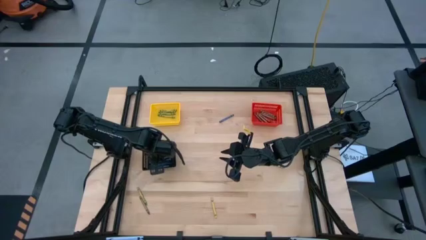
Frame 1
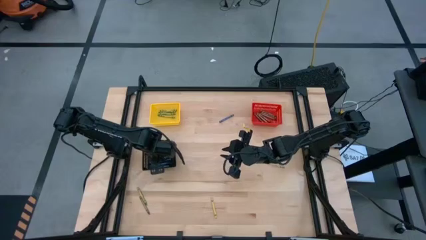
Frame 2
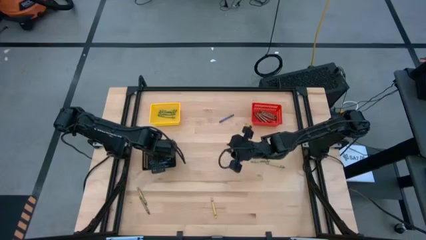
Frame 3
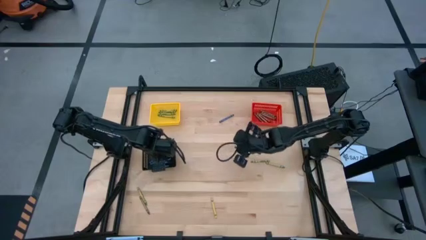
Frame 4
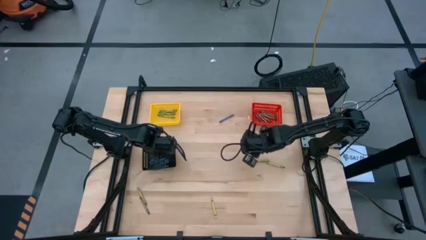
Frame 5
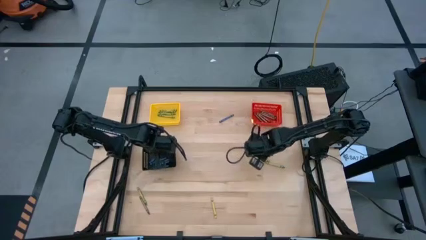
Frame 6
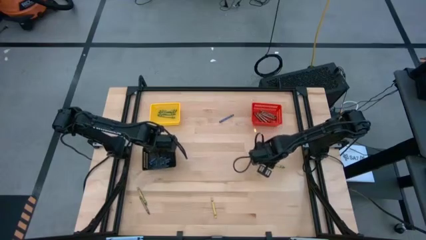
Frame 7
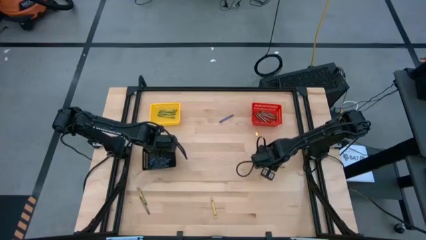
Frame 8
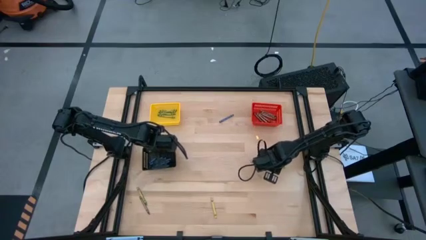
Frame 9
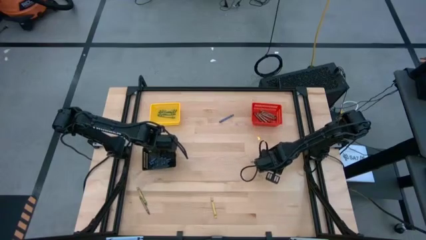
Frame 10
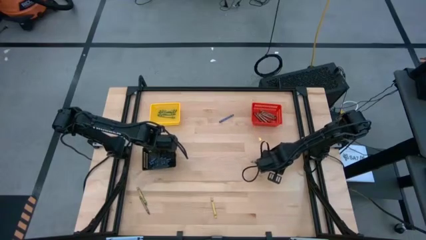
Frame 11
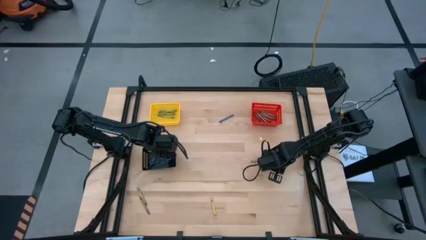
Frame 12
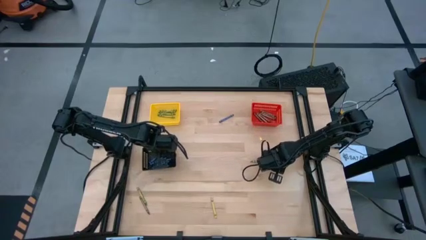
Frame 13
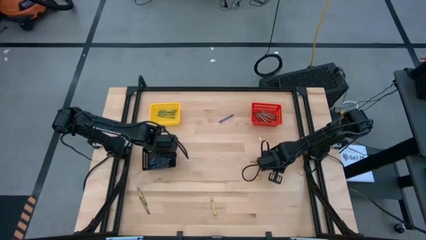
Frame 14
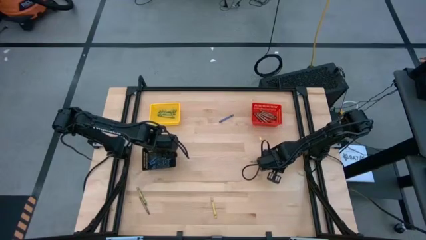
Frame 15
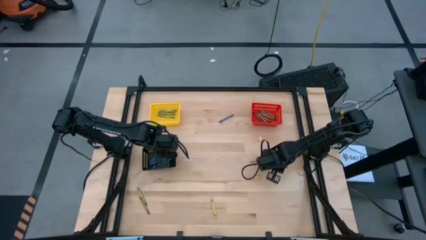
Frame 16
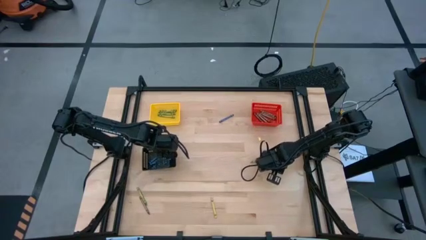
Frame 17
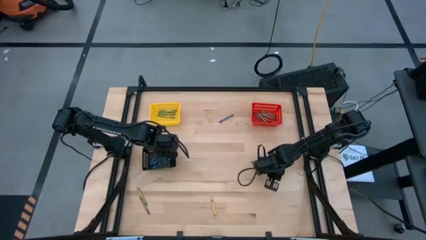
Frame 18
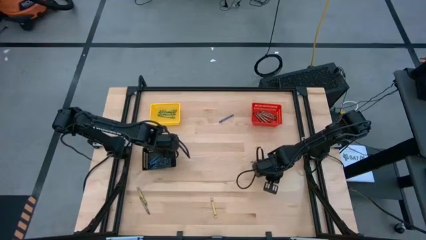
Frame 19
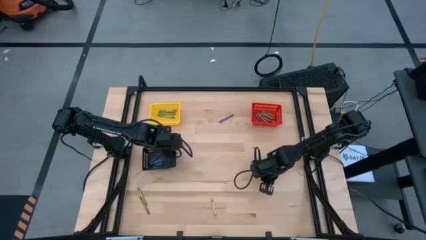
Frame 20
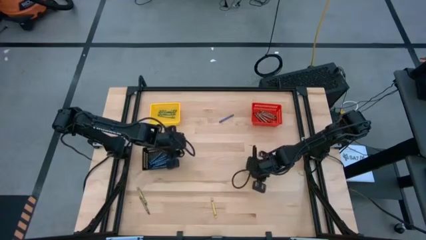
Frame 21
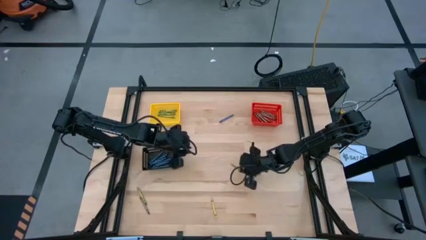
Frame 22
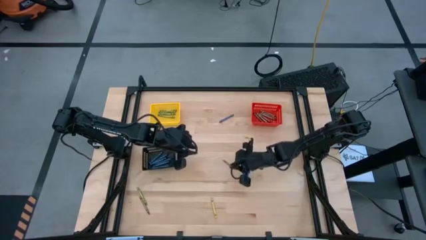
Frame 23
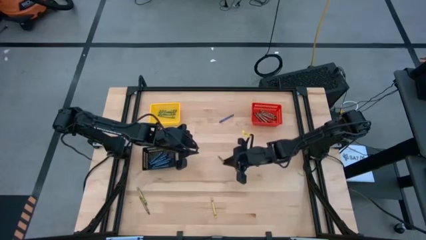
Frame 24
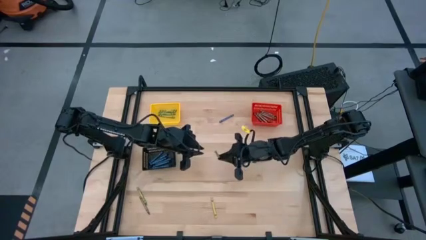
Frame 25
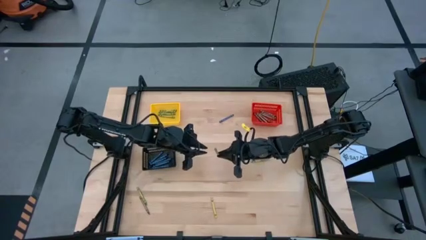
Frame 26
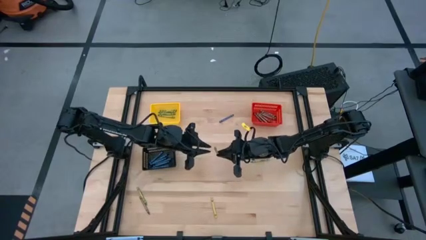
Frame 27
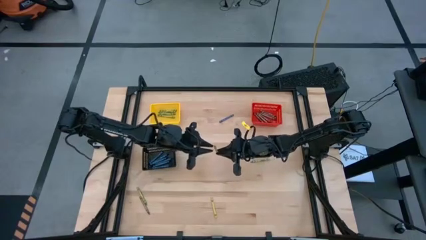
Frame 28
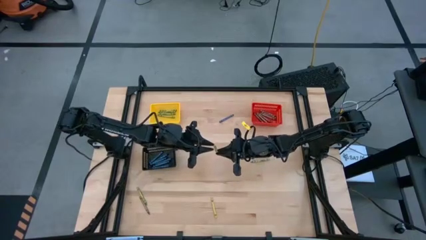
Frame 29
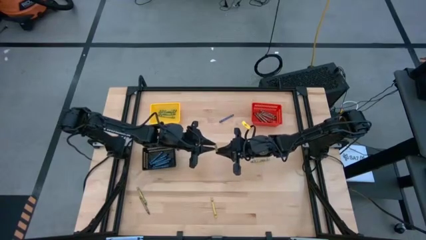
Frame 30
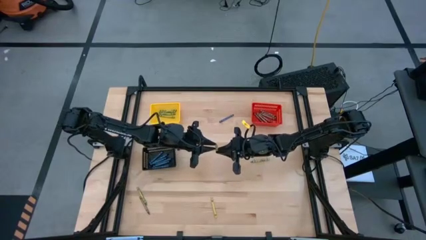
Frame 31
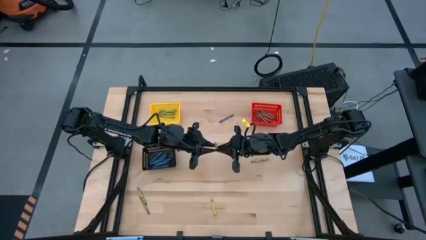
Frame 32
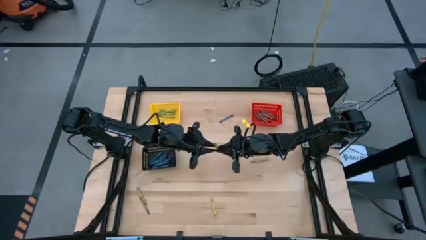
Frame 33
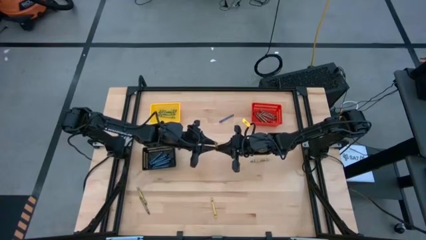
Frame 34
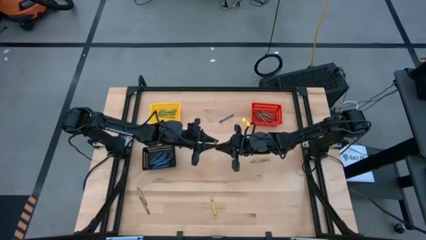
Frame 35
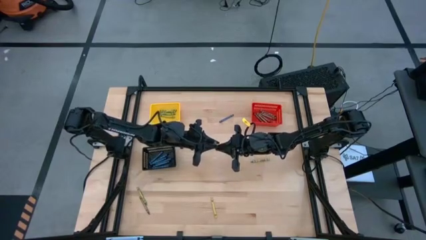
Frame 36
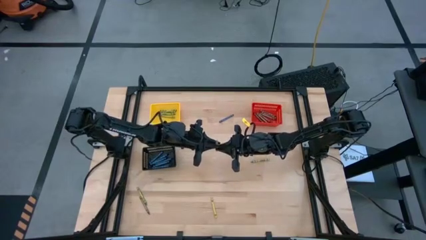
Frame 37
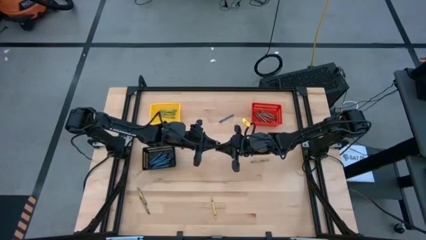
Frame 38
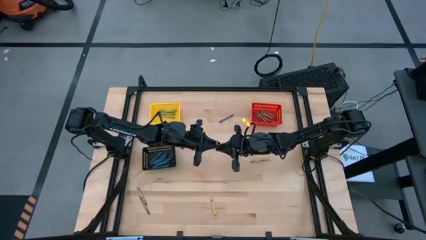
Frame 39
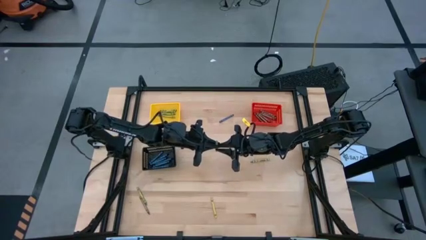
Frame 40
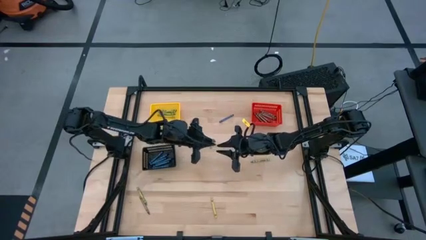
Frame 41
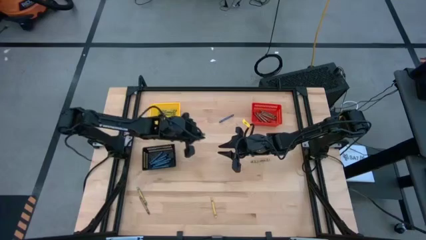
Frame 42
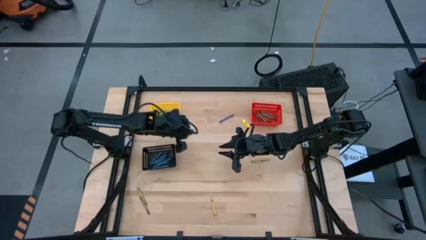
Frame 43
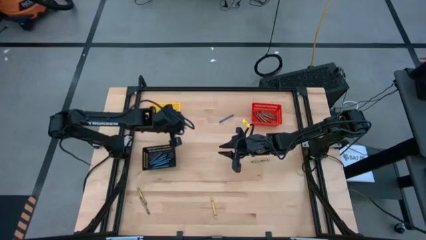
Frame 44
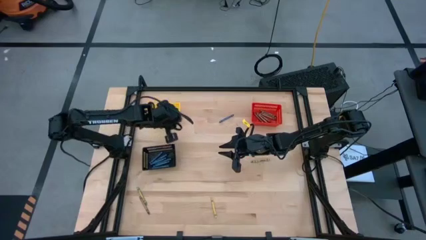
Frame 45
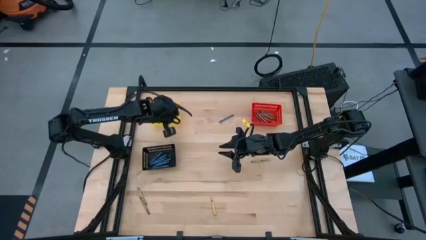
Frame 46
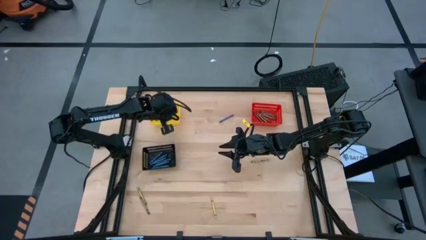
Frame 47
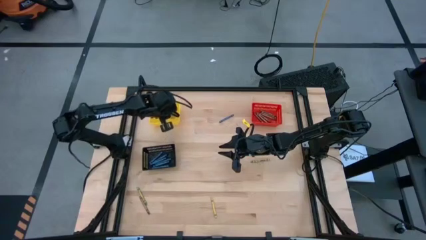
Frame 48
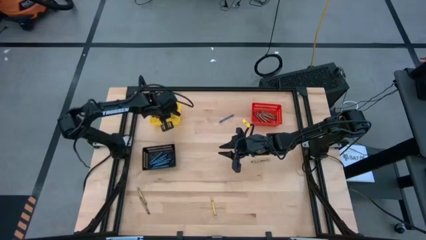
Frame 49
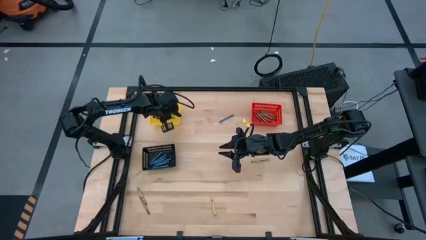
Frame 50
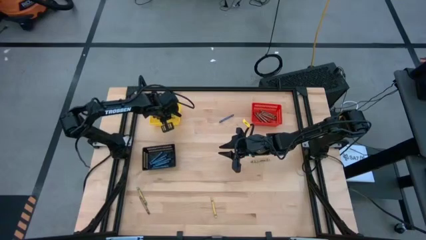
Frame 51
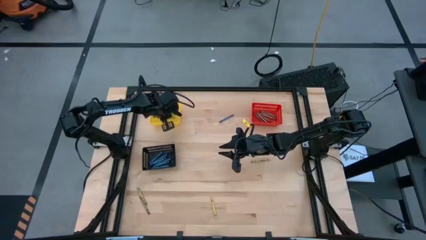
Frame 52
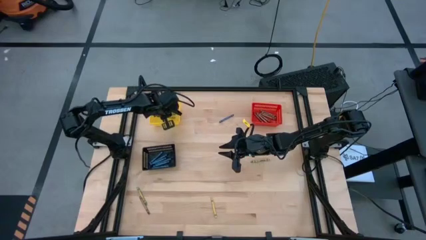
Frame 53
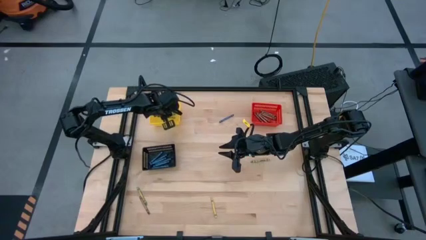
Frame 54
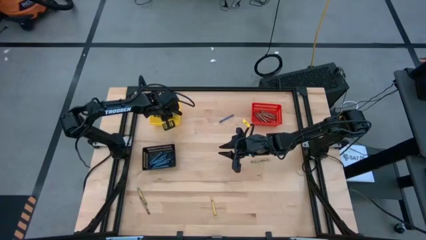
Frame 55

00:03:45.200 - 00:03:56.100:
Task: Sort crayons
Put the green crayon into the yellow bin

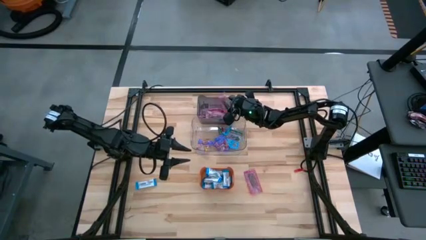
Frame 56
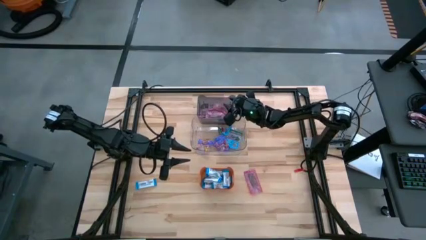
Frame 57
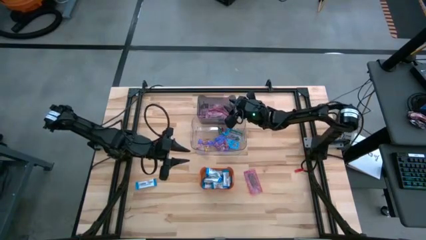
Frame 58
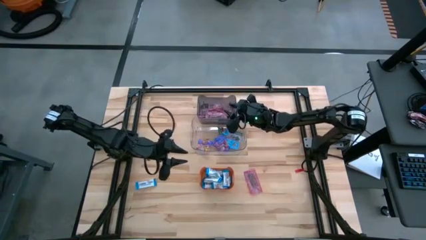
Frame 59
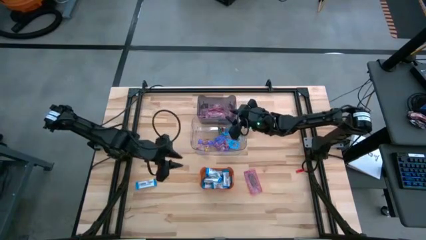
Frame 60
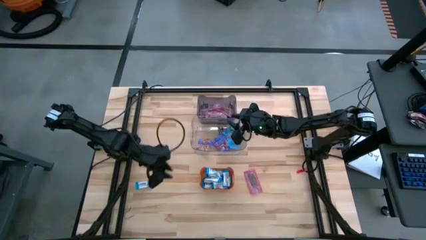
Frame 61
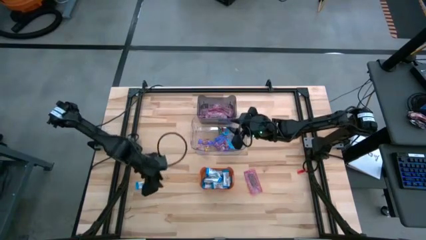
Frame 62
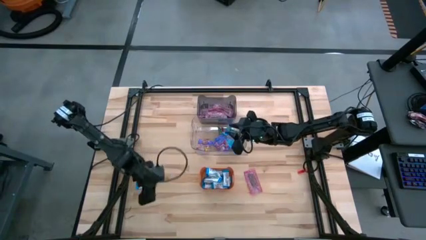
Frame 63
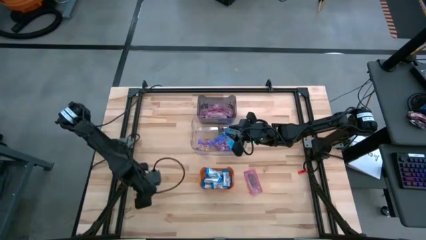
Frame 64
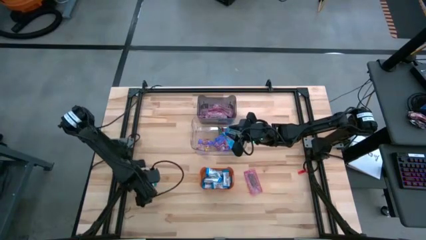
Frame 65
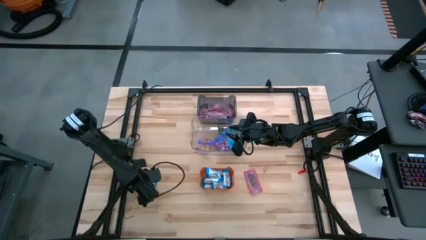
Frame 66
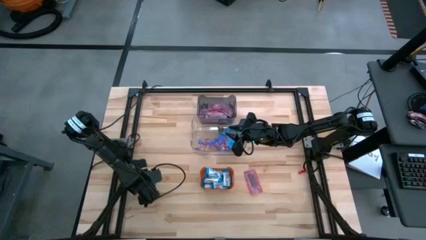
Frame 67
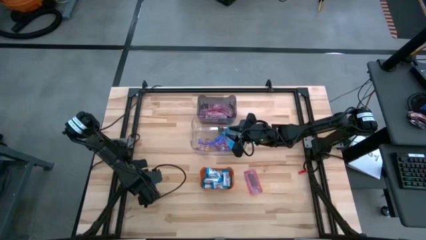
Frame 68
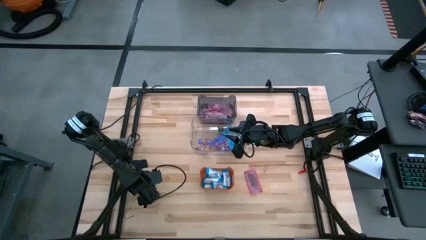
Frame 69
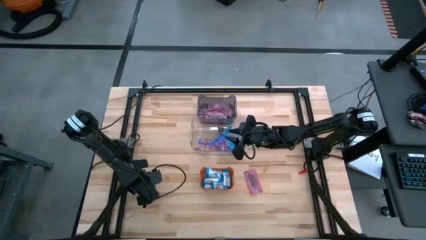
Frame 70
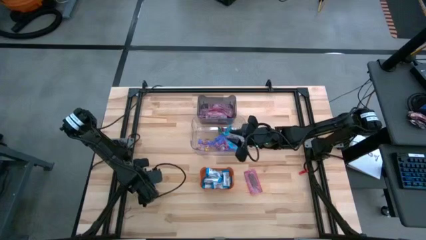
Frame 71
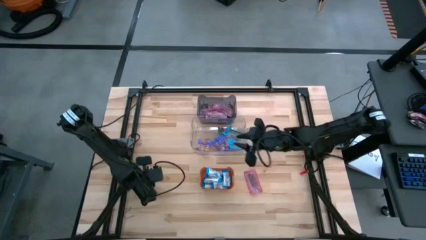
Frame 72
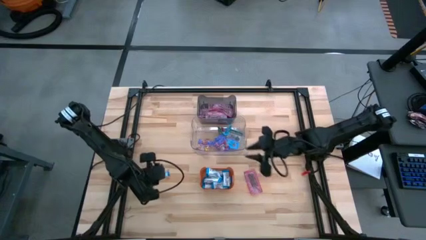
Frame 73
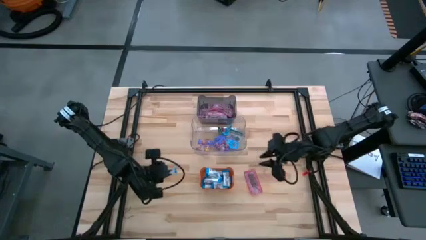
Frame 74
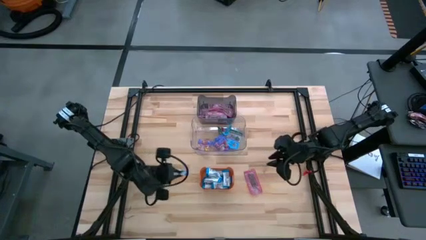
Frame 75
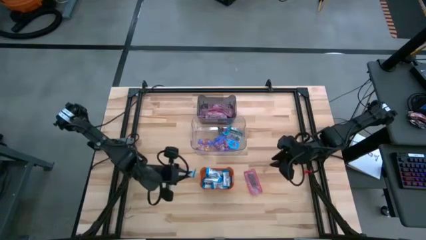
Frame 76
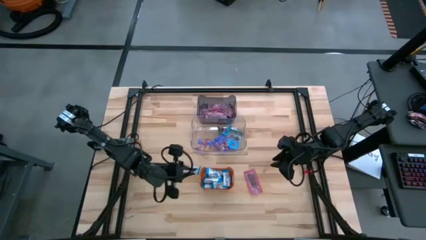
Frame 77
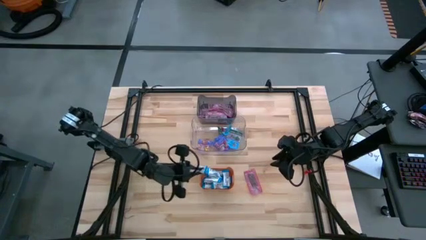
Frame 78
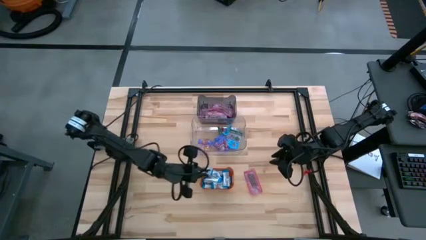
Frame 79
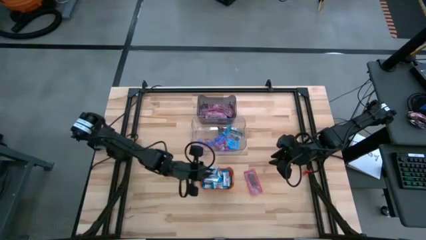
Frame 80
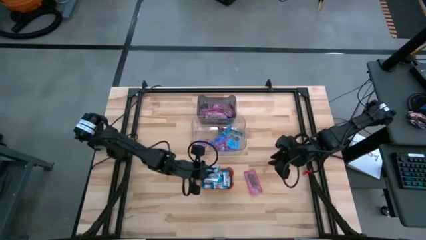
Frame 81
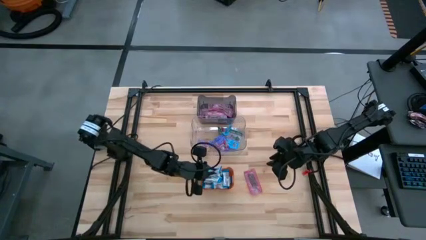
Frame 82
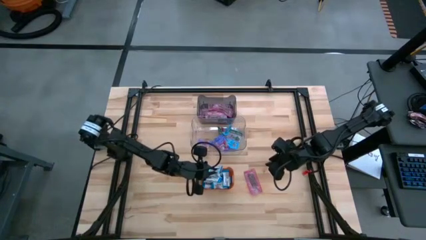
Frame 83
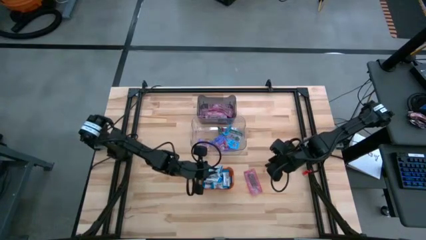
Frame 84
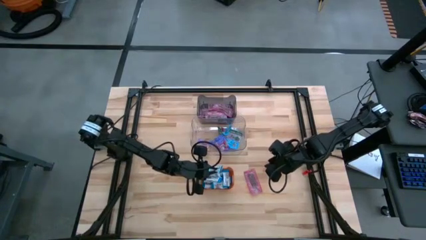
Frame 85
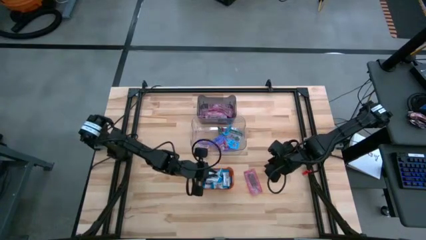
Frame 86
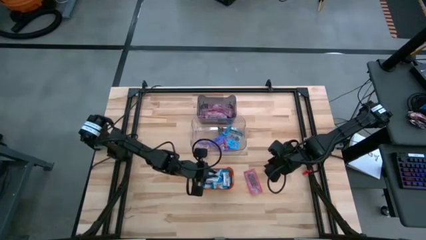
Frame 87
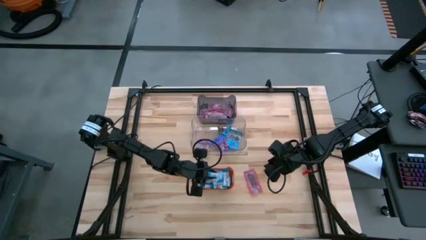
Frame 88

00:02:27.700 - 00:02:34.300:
Task: Sort candy
Put the white chocolate bar into the orange bin
